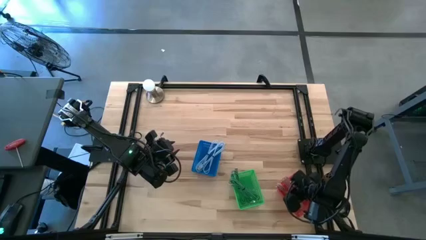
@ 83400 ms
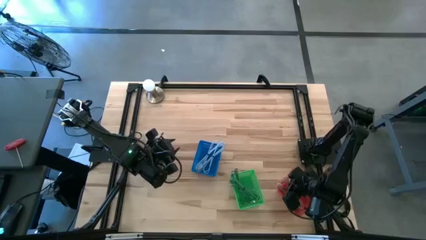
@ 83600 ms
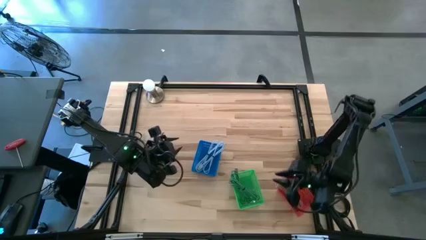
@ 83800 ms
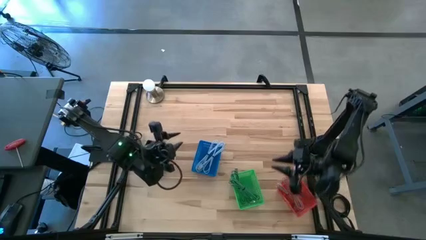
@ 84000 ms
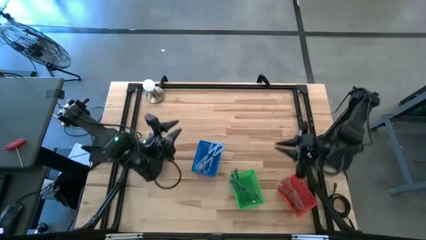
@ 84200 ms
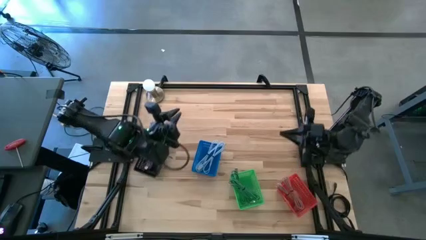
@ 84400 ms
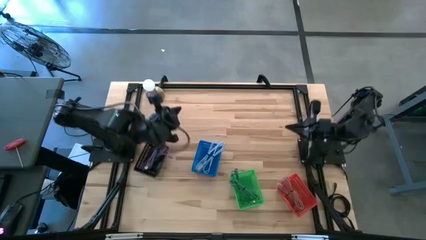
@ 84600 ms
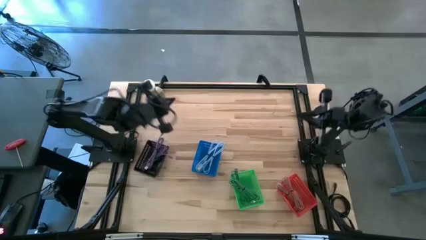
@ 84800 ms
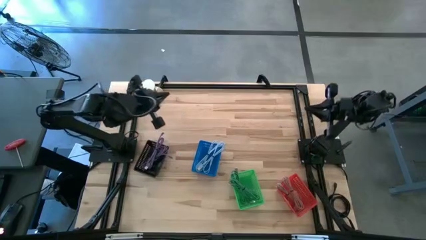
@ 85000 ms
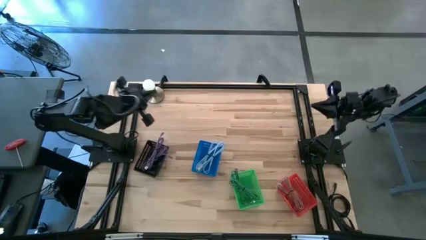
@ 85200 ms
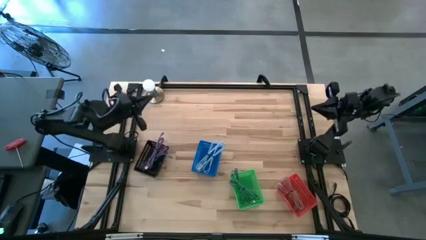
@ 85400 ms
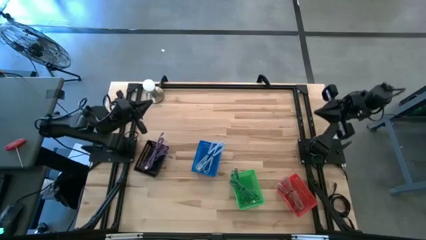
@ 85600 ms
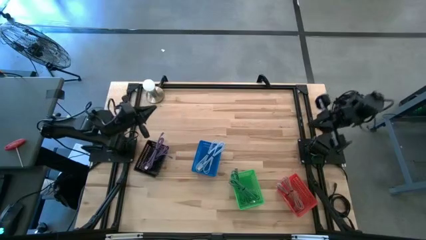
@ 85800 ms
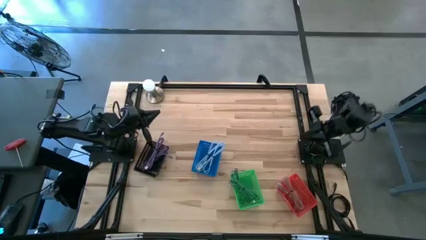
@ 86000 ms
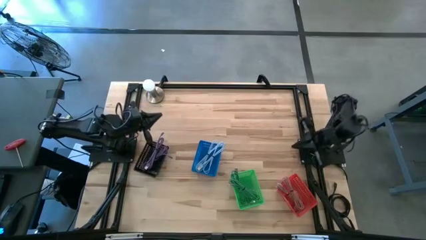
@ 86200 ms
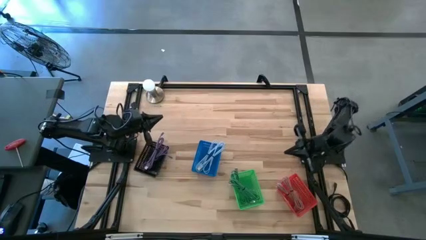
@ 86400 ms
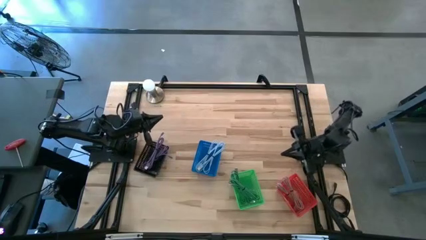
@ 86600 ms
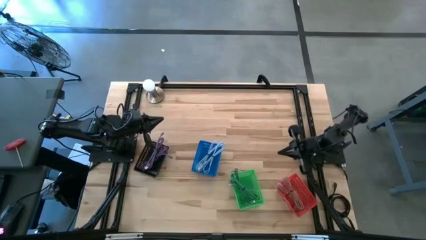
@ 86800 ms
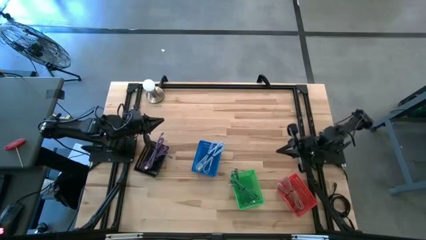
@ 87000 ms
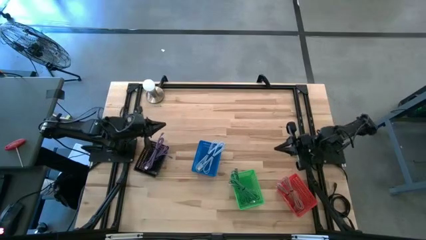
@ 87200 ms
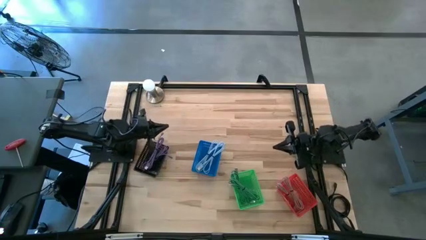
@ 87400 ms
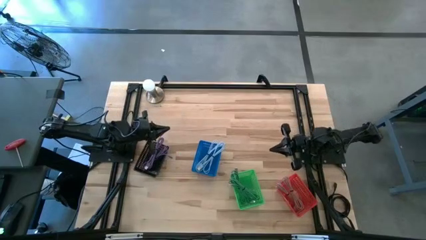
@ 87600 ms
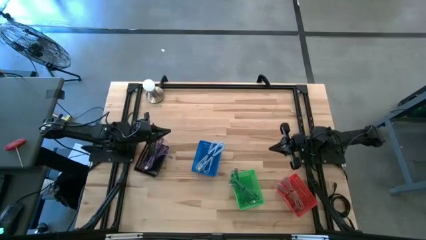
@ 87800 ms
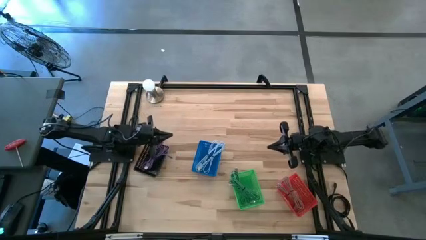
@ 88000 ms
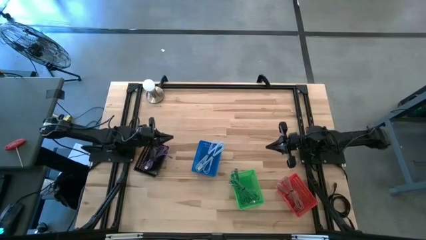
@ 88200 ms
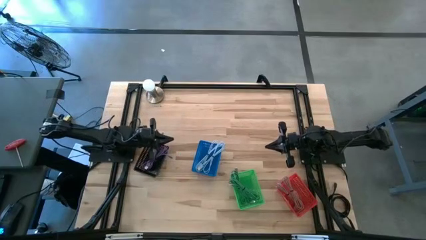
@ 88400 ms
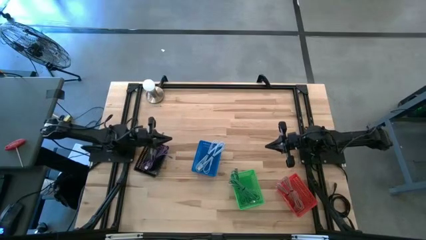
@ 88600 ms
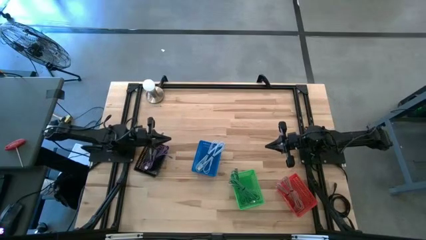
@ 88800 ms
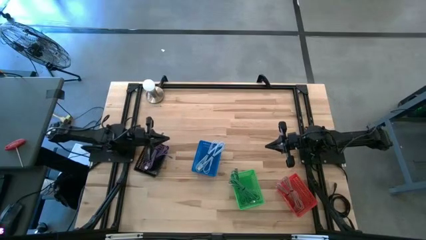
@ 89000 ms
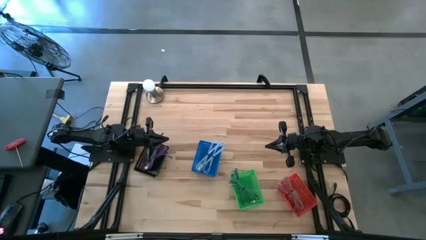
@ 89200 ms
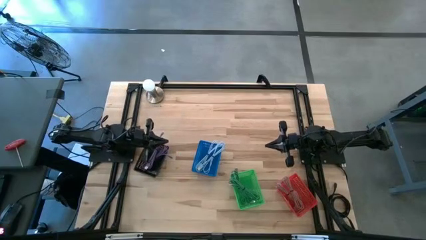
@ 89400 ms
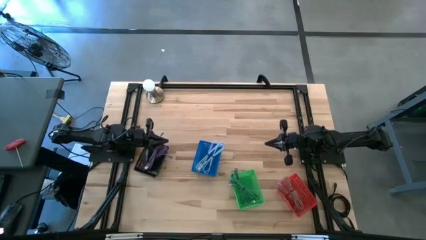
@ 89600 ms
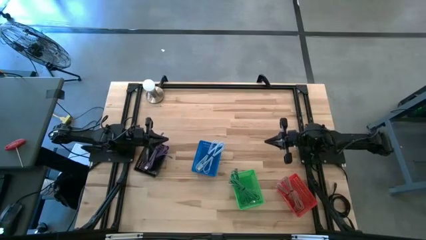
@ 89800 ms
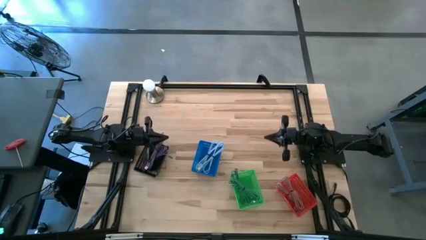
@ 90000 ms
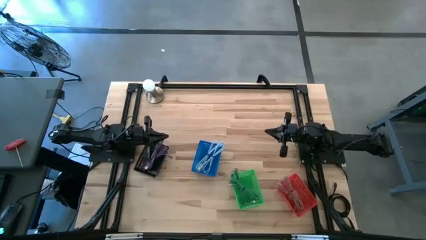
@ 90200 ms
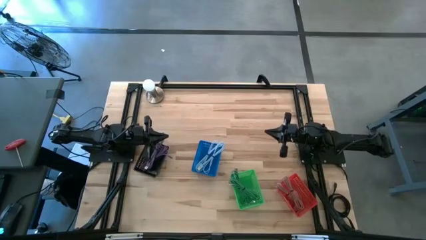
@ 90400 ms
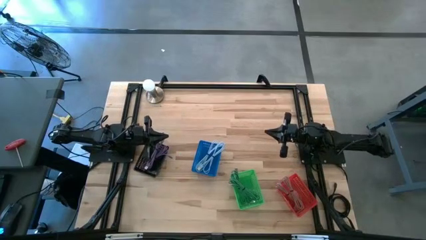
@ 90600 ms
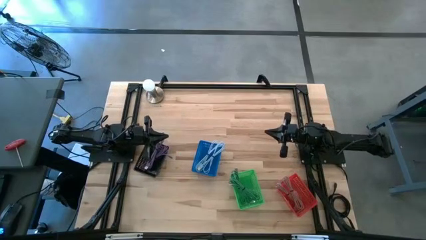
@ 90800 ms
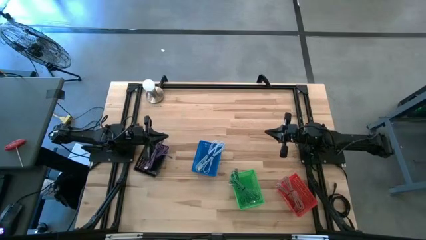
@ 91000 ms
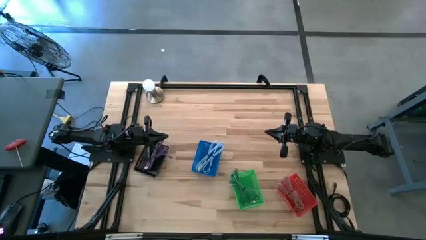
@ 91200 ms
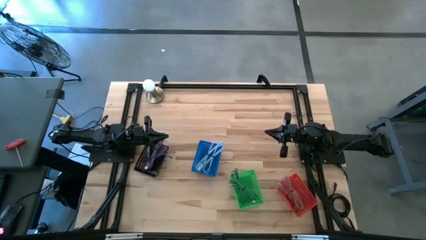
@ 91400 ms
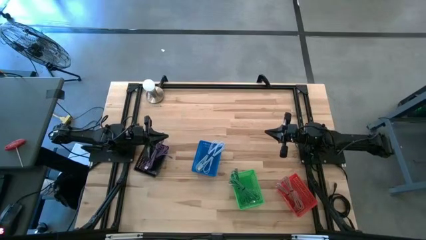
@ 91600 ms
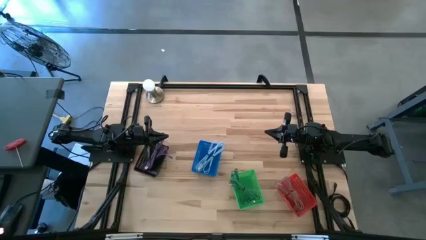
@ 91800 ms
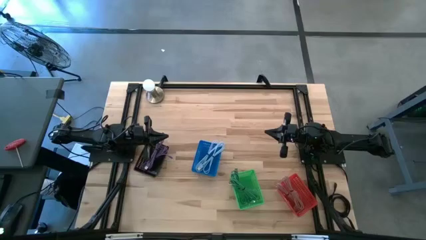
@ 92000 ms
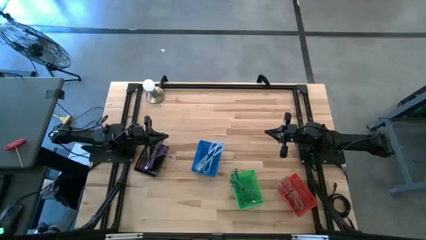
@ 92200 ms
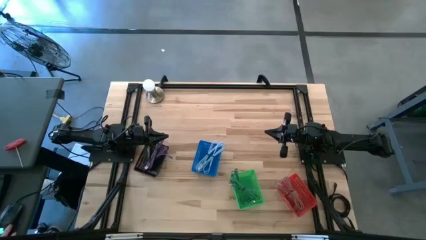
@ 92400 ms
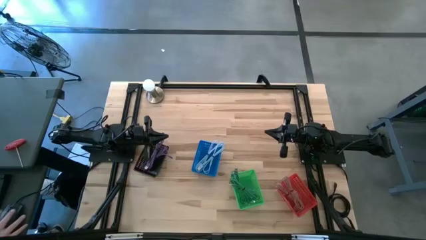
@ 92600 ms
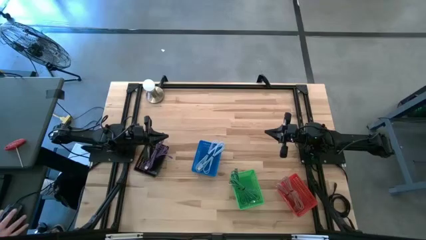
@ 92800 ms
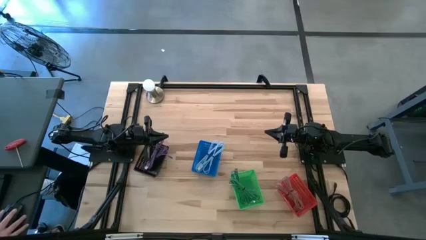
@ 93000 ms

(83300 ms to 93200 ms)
Task: Pick & Place USB Port
Return to Home Position

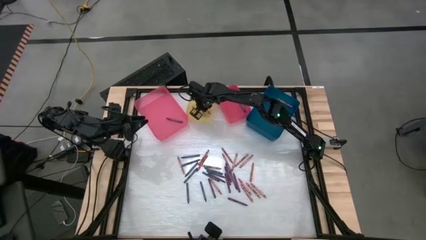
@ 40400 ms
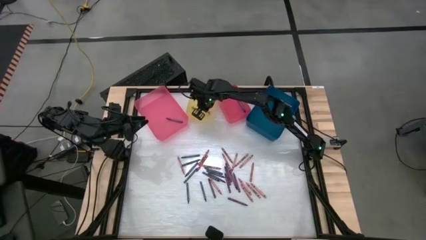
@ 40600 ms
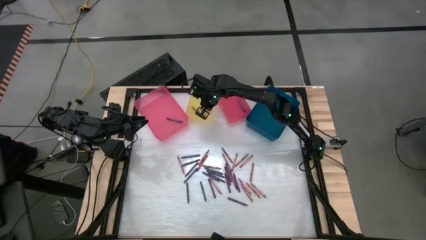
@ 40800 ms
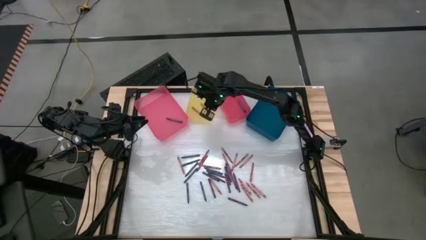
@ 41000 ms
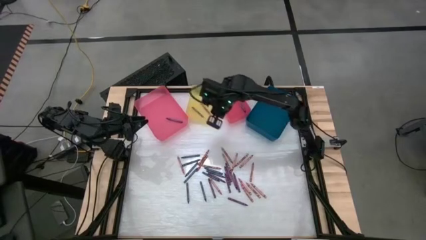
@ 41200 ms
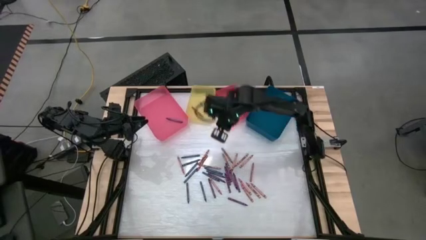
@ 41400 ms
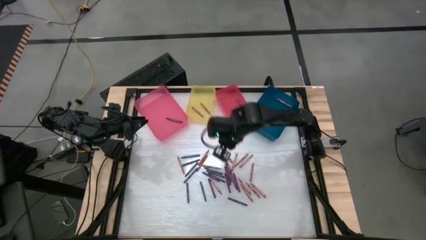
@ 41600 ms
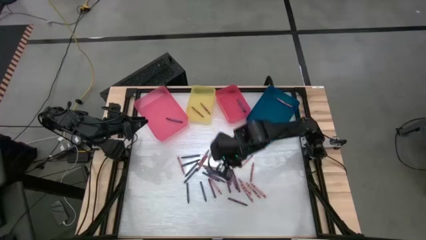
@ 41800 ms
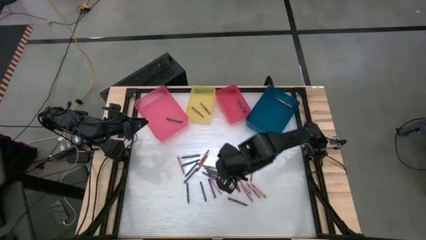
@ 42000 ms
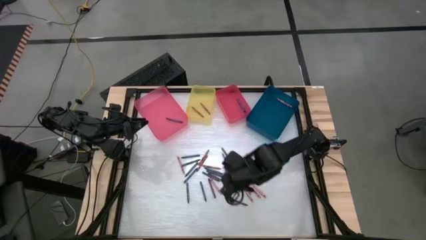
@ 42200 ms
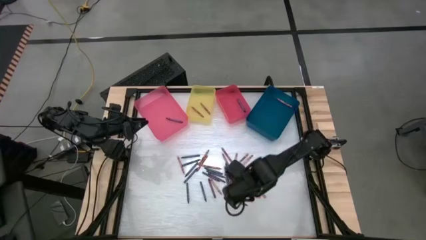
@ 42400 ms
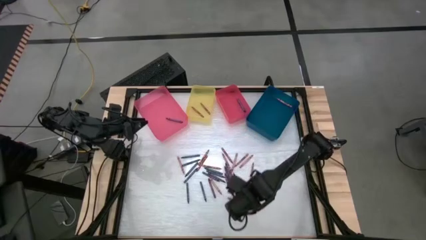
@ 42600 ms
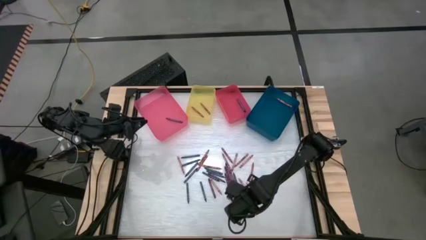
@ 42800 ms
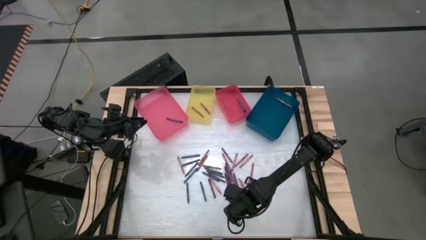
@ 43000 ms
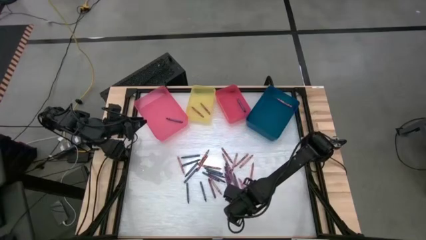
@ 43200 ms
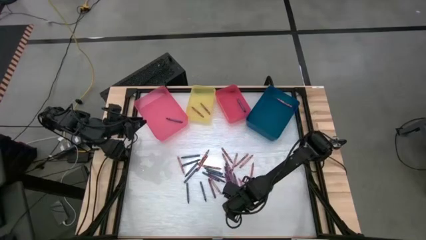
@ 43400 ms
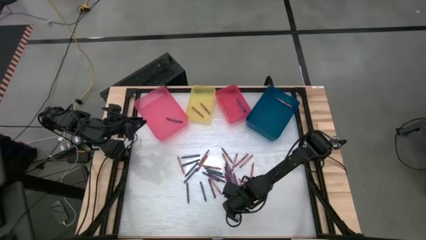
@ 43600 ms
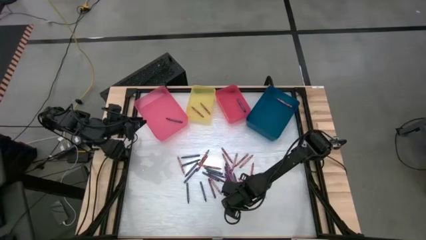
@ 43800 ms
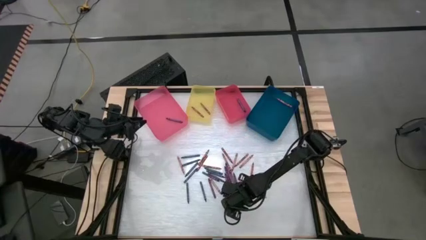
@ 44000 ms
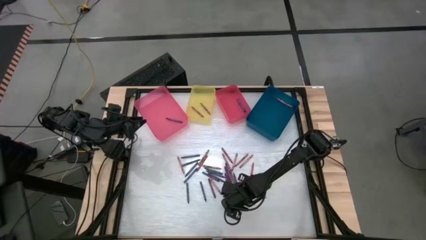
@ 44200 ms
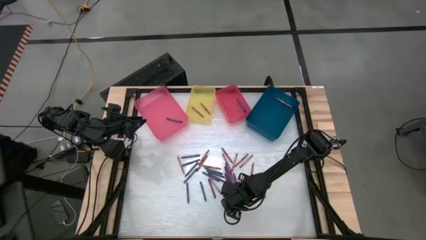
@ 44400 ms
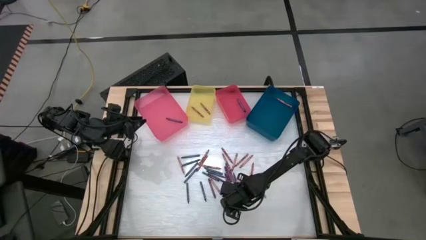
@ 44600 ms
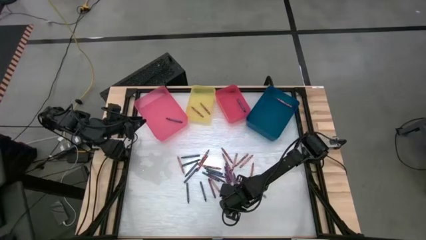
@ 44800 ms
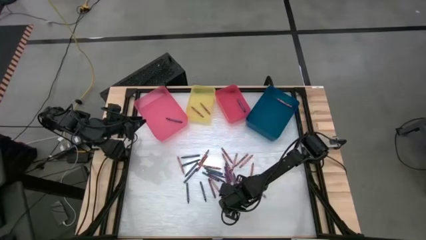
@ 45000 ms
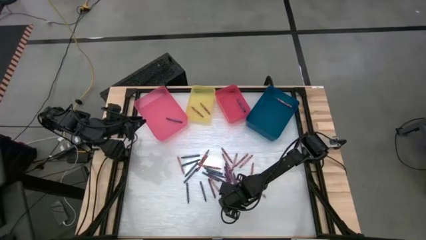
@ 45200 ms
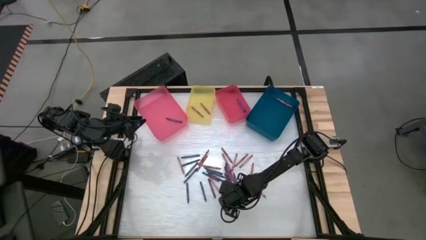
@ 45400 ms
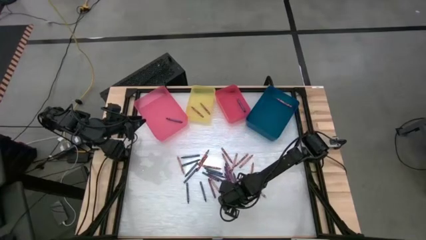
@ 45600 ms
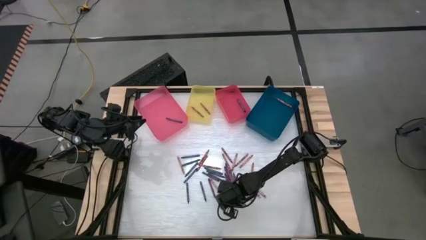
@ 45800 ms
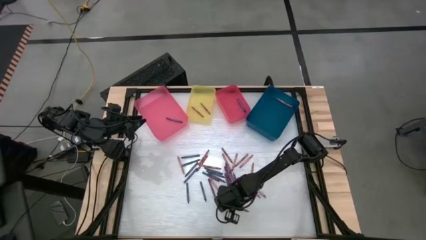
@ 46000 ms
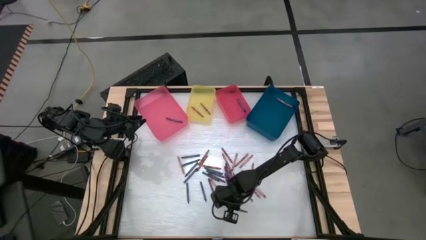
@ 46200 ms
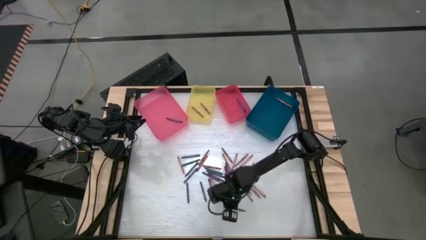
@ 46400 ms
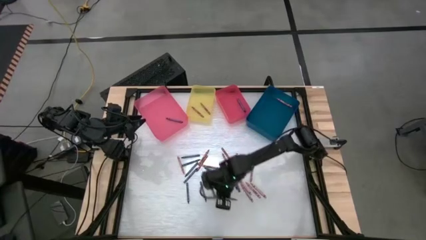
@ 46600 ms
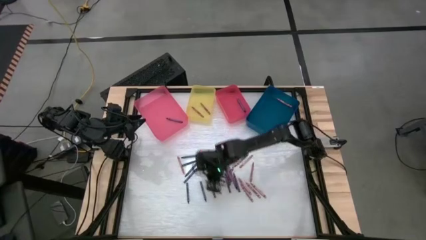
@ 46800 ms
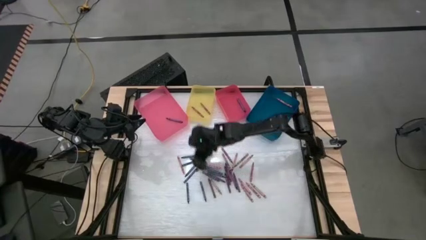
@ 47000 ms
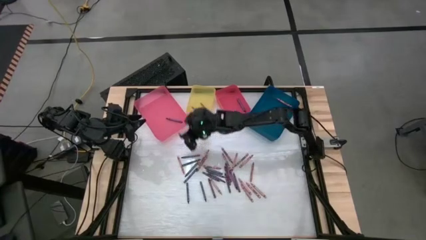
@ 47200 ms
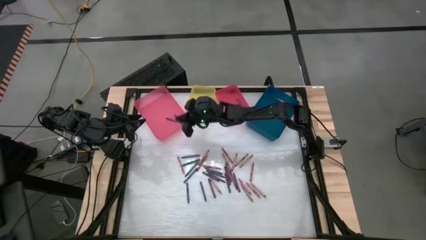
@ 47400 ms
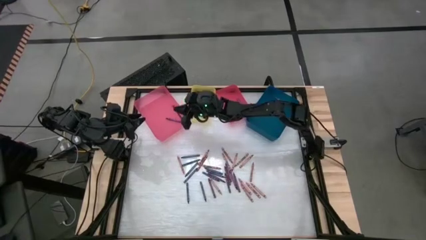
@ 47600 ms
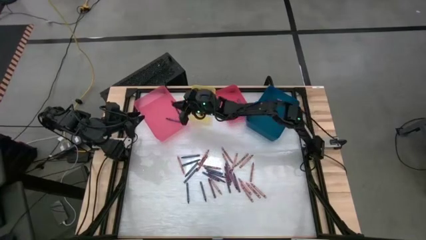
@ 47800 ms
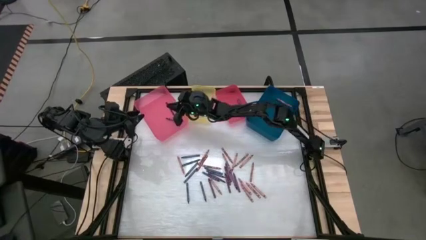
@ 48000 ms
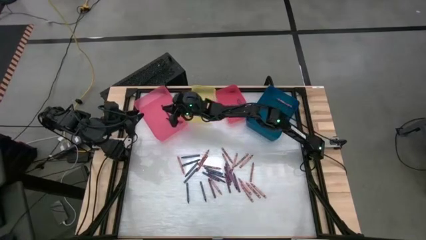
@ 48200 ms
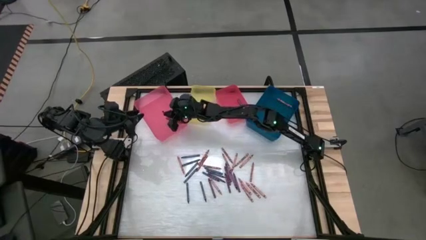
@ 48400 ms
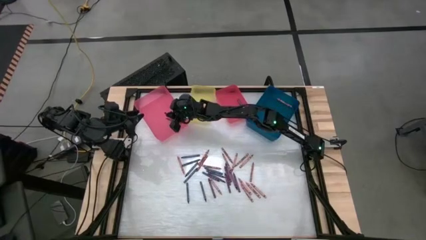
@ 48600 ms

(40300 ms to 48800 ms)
Task: Sort crayons
Put the violet crayon into the pink bin
